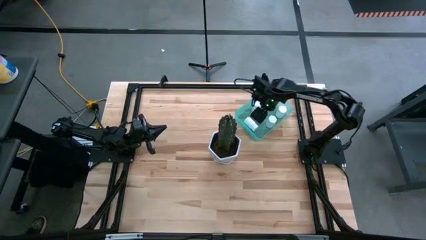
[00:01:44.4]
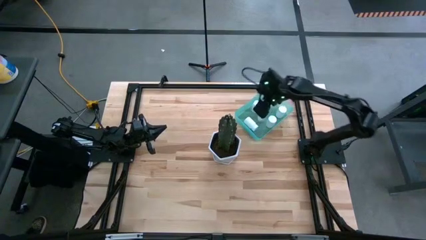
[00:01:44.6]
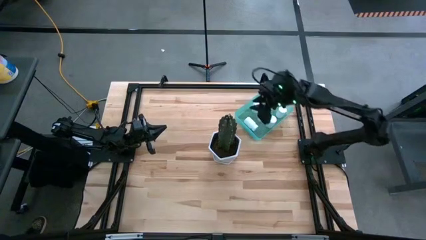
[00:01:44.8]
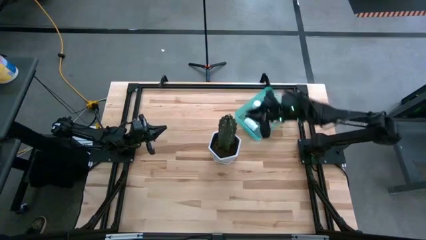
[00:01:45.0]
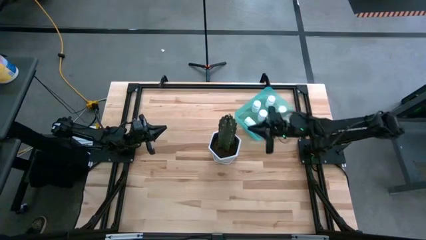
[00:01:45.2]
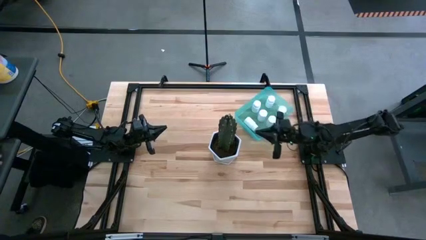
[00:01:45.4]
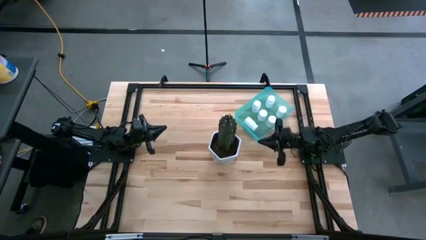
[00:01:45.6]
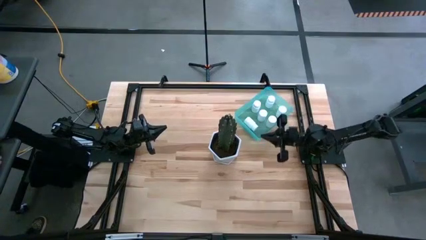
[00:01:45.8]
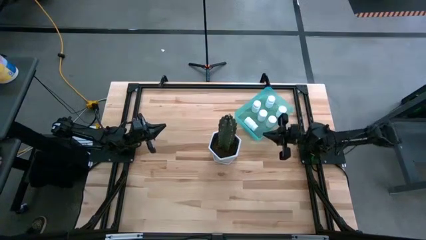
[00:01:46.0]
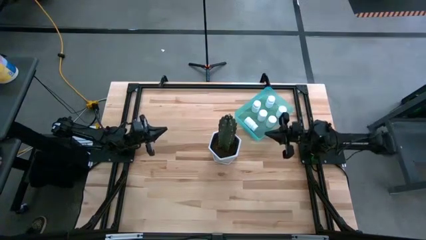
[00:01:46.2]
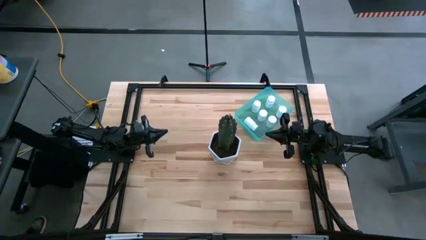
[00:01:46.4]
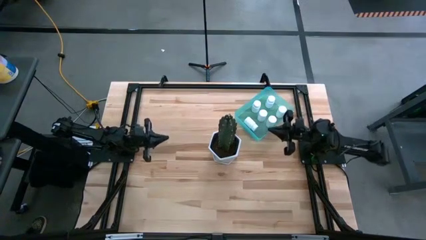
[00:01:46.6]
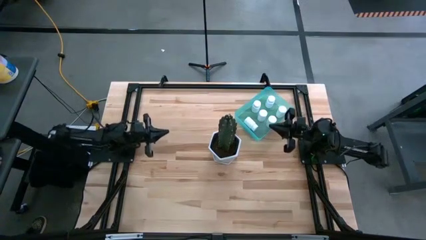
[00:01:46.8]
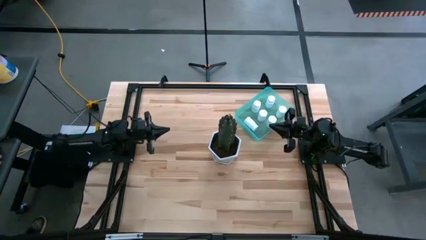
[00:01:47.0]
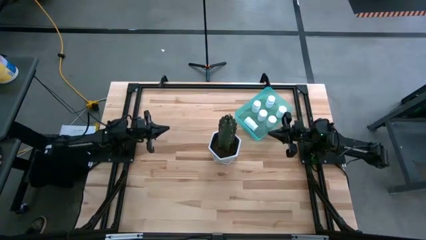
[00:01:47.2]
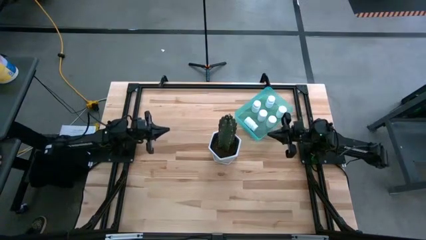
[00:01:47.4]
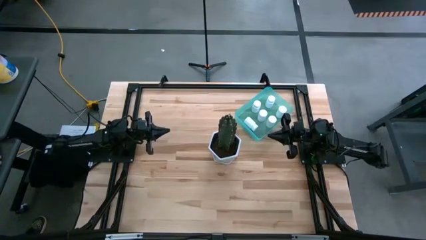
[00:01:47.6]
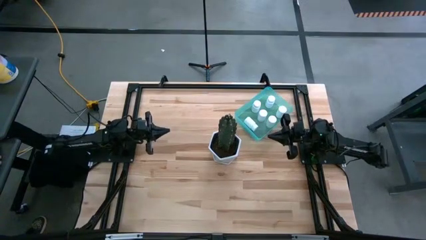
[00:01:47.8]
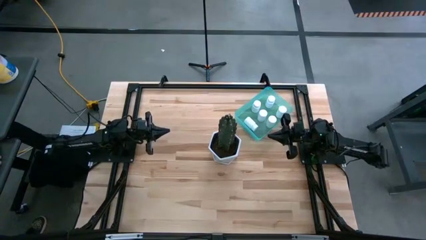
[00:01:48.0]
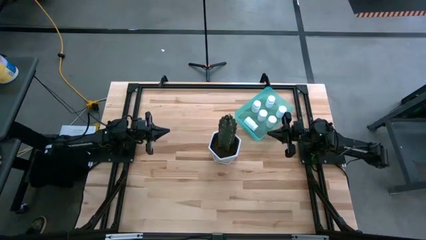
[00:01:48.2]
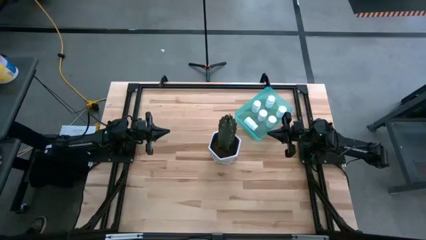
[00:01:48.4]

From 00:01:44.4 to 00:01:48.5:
Task: Pick and place pill bottles into a basket
Return to Home Position

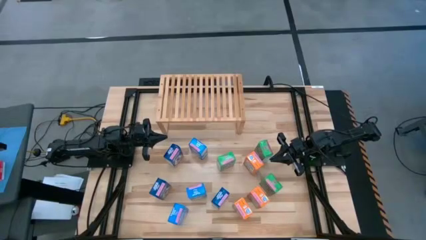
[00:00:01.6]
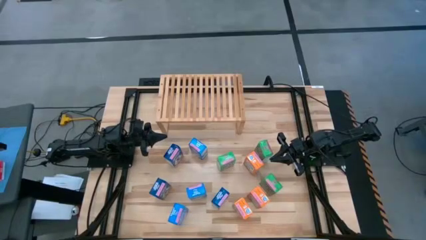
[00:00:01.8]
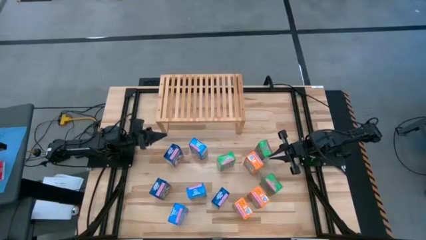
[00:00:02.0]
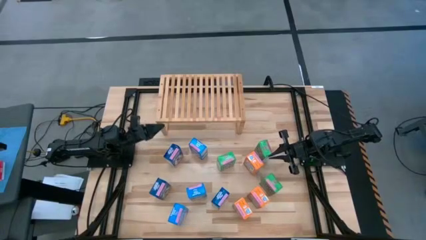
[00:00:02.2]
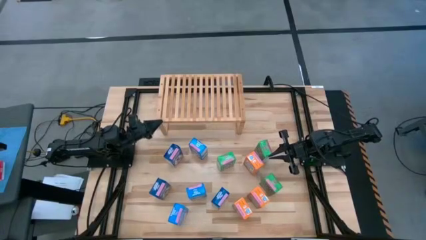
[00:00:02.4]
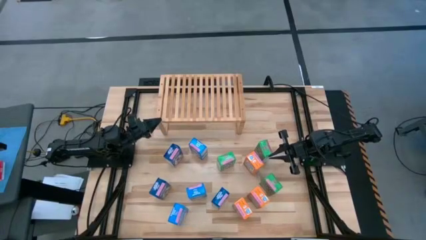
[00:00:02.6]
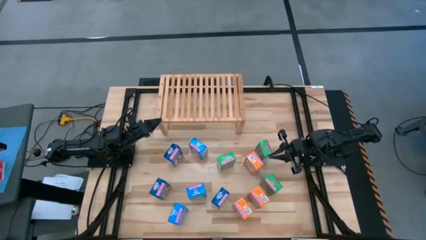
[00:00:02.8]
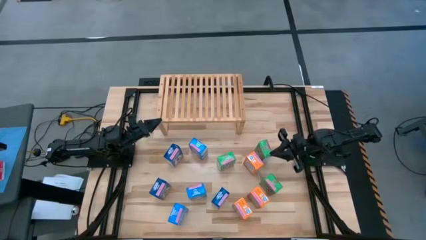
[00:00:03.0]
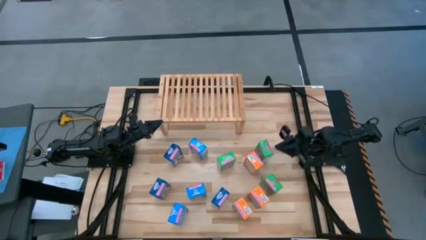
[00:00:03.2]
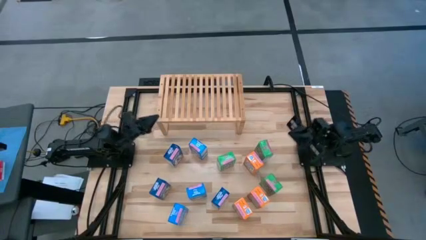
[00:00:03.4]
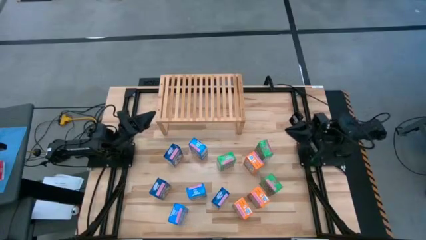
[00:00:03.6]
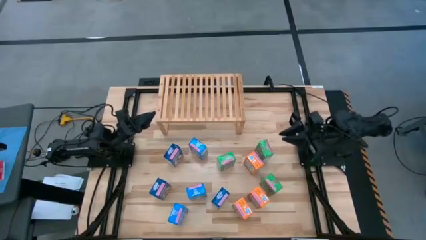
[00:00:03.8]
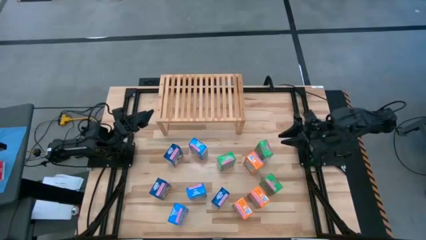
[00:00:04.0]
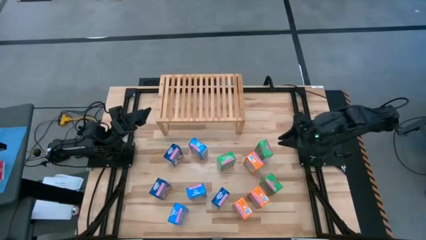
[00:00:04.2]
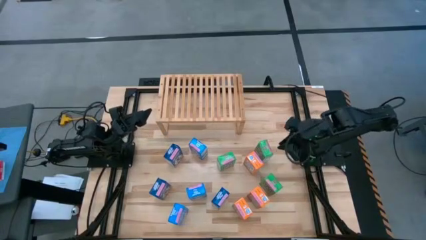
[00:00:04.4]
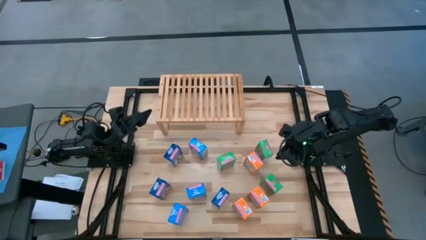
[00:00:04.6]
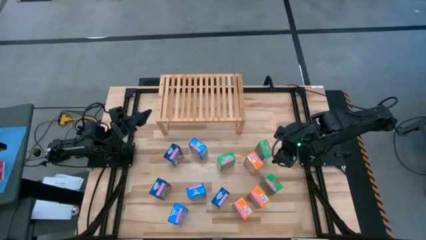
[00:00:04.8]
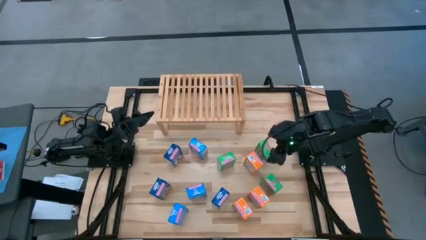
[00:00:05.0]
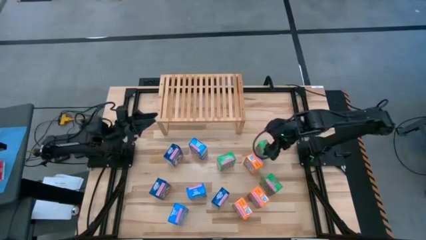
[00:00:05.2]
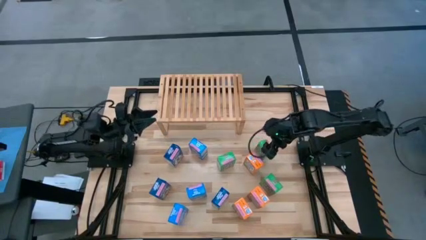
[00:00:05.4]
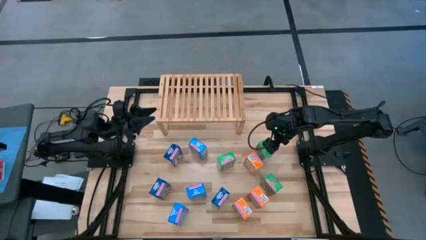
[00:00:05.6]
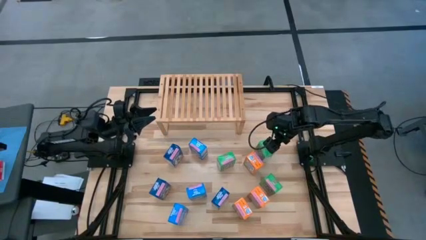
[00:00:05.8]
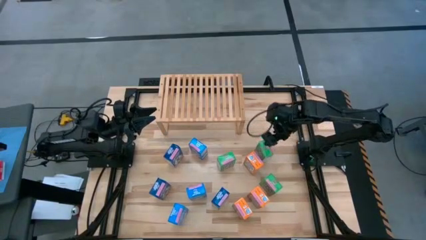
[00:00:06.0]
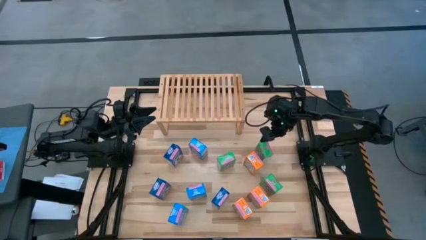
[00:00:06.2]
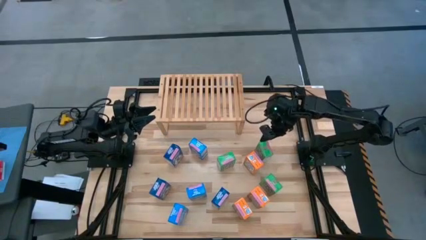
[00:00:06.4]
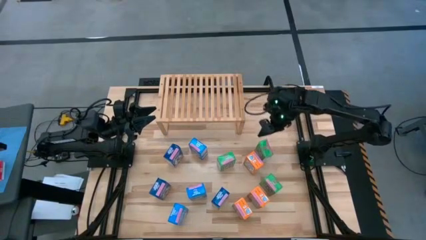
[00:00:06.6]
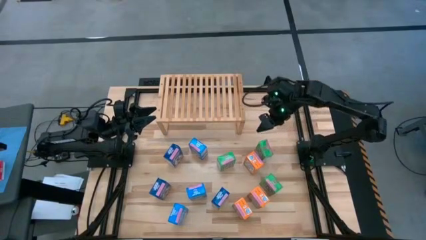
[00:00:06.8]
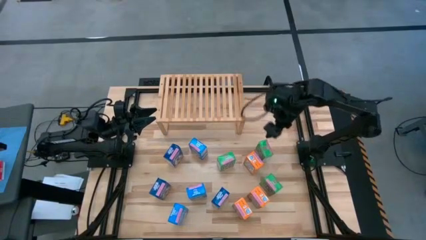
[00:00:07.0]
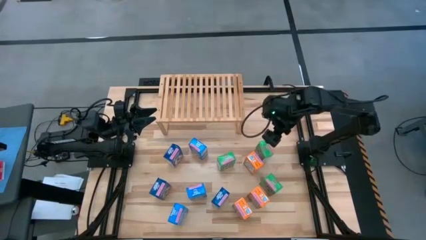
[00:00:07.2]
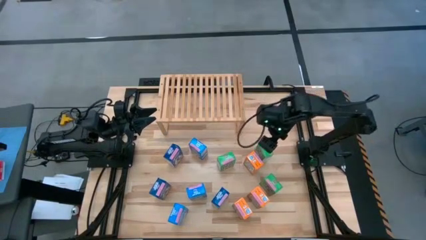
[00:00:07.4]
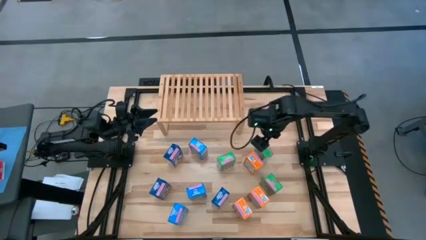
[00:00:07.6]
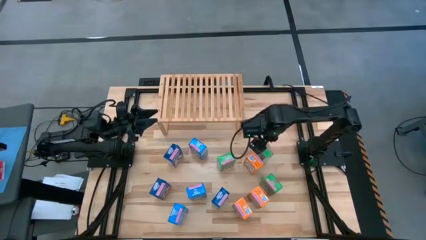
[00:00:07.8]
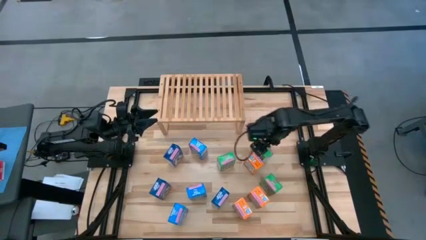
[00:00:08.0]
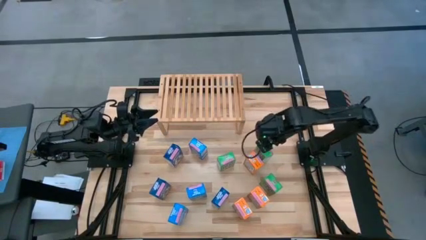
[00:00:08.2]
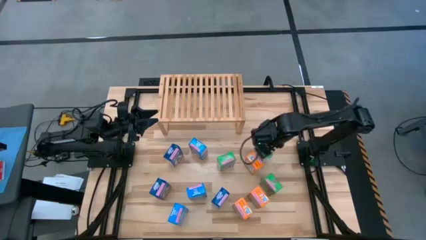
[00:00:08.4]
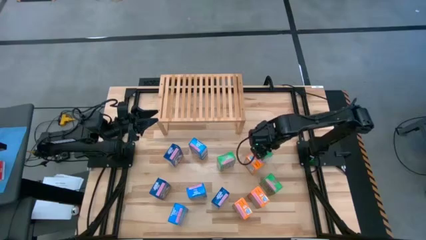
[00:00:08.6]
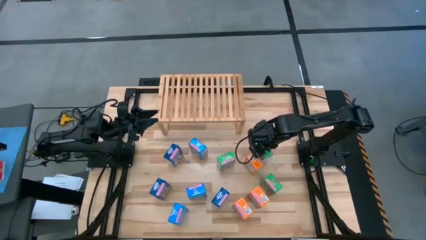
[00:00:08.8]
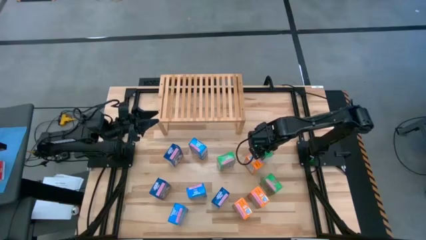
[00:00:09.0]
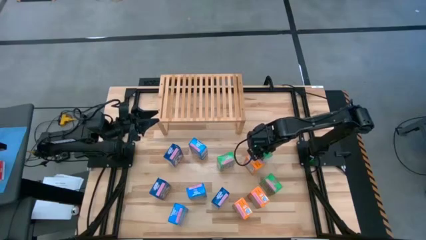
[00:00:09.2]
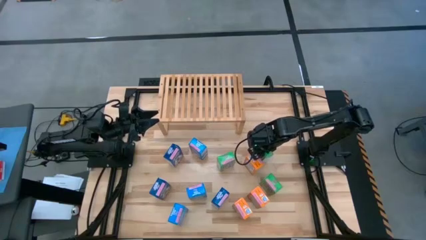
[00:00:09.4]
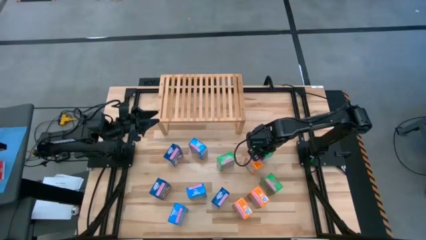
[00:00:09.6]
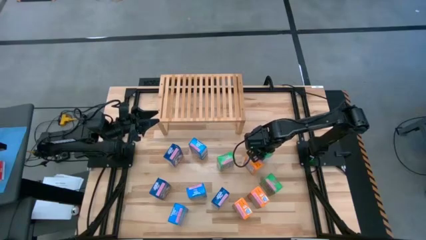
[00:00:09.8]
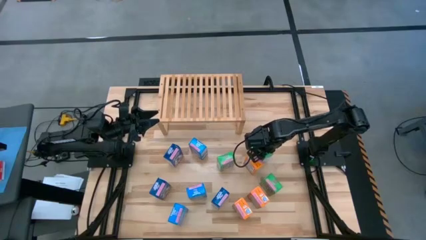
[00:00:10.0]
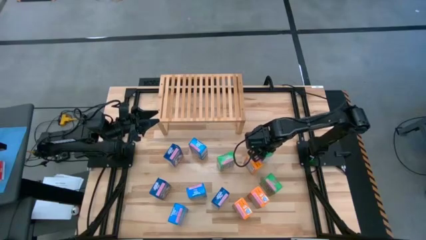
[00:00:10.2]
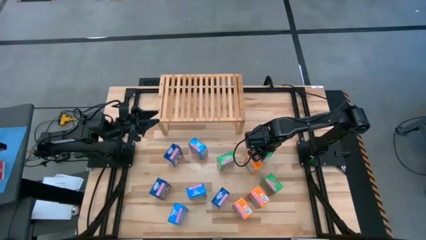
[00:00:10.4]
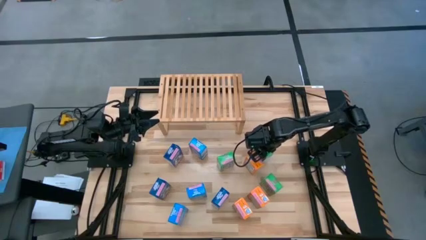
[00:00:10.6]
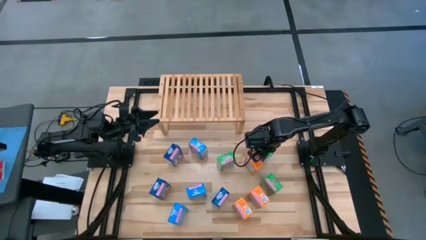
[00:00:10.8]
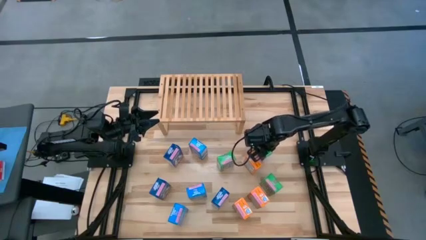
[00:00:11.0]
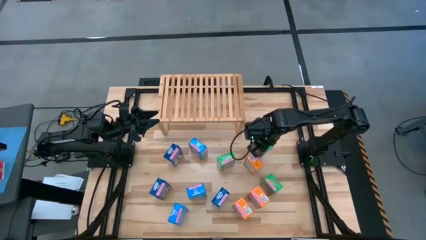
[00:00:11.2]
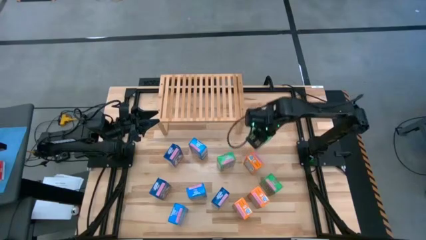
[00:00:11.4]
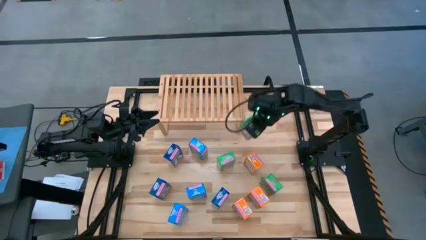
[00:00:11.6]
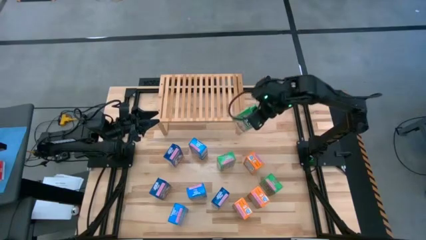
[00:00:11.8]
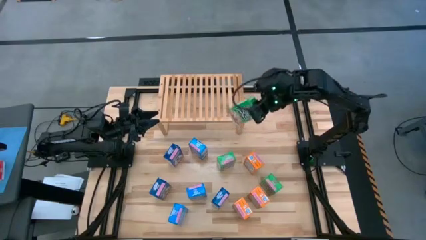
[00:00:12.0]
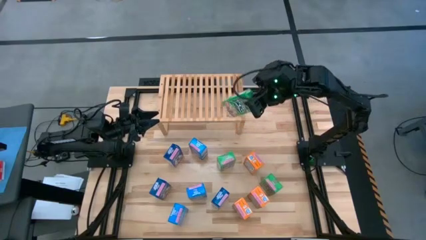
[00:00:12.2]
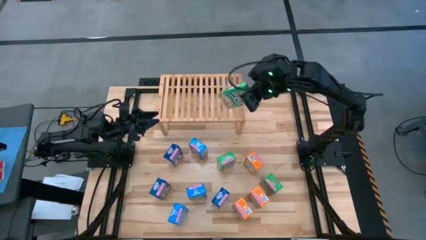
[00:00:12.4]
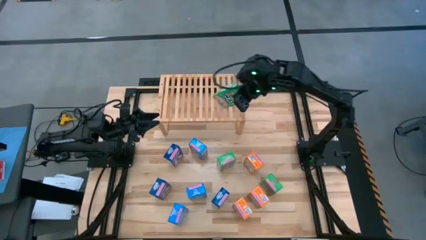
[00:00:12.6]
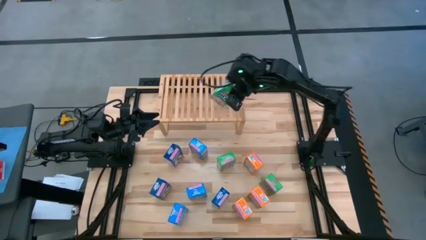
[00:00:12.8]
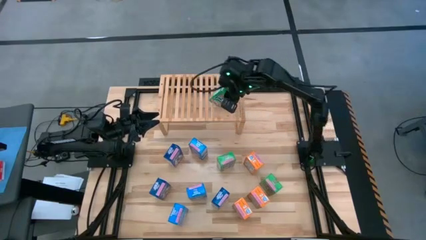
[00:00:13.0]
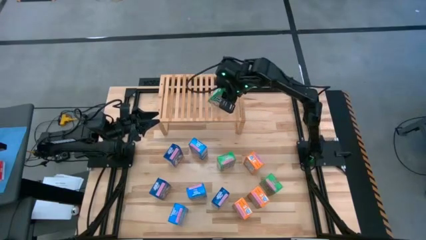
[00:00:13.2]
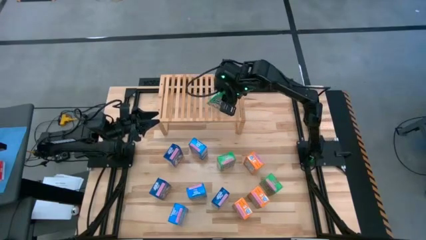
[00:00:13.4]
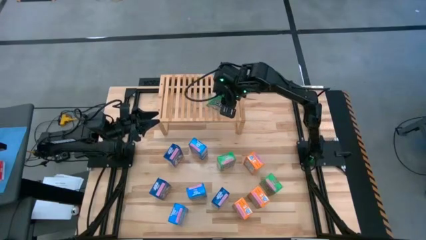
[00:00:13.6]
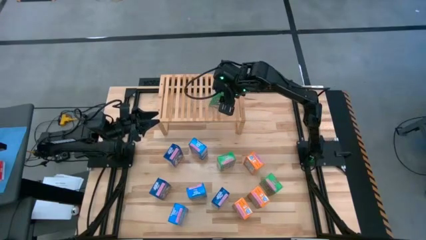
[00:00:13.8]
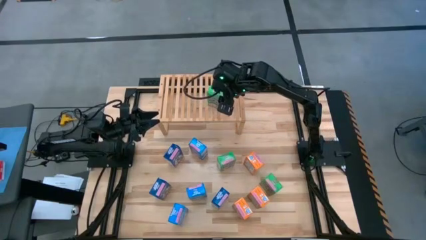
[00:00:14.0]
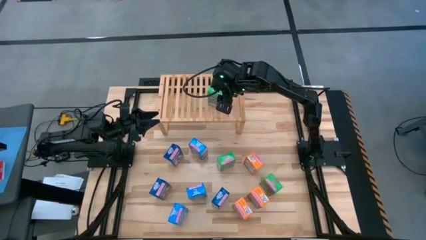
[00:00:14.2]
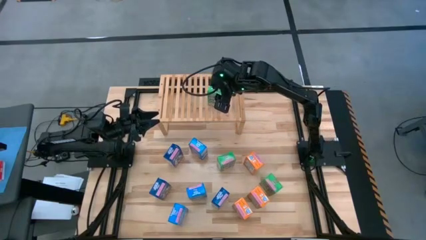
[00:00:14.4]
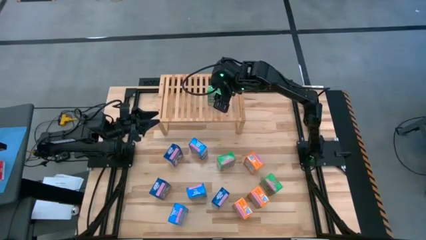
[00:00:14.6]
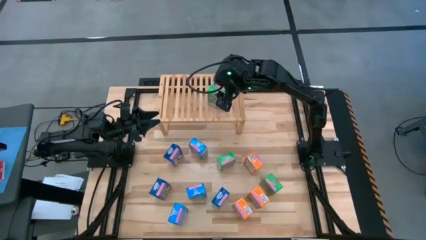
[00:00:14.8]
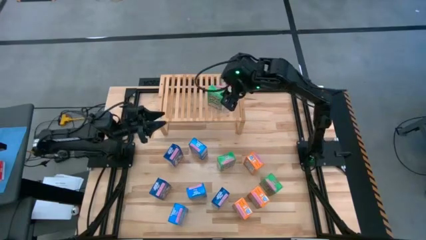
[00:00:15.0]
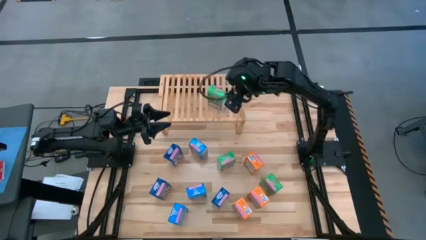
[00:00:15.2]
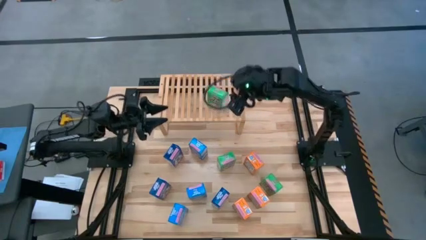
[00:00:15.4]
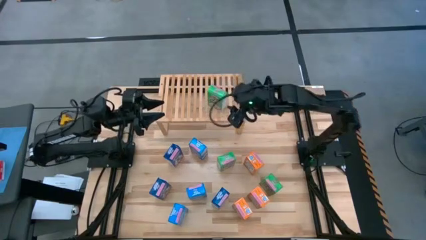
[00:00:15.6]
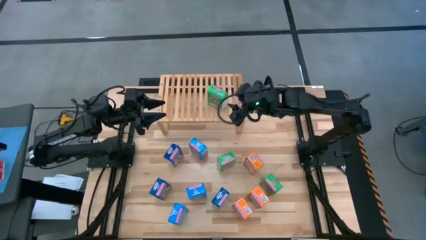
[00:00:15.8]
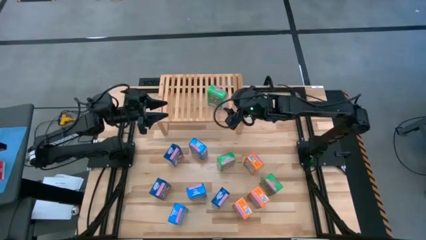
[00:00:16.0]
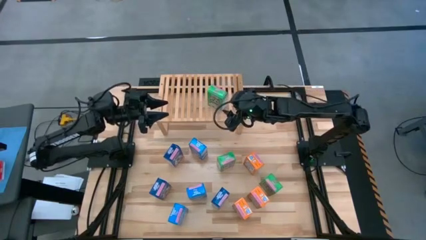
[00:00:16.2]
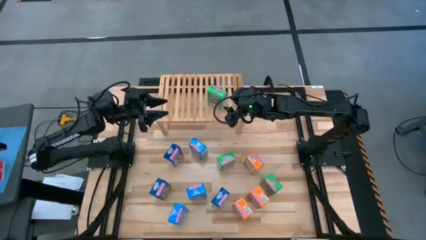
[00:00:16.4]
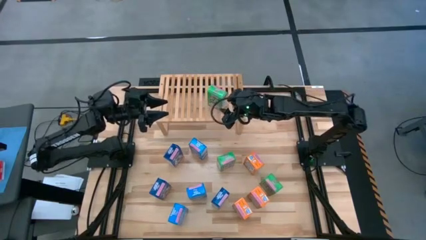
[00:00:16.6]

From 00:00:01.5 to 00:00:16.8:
Task: Stack cereal on shelf
Put the top right green cereal box on the shelf
